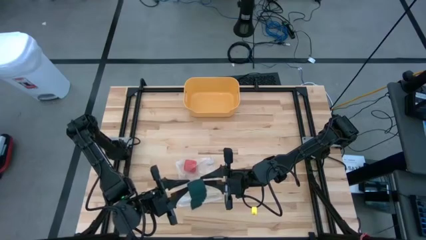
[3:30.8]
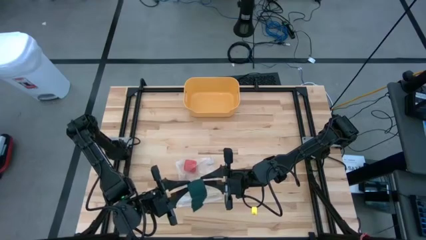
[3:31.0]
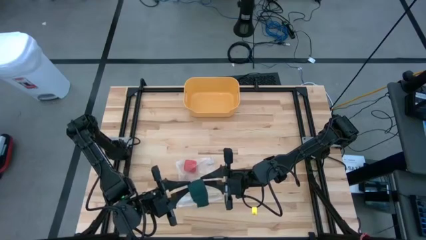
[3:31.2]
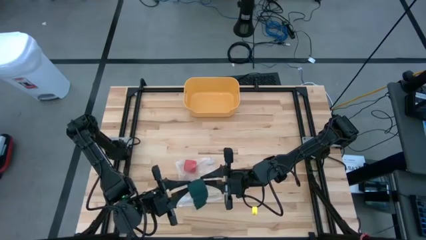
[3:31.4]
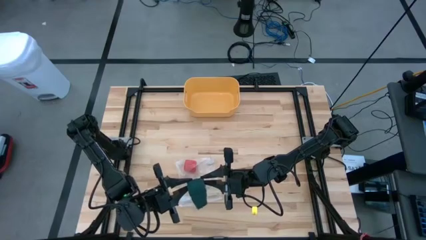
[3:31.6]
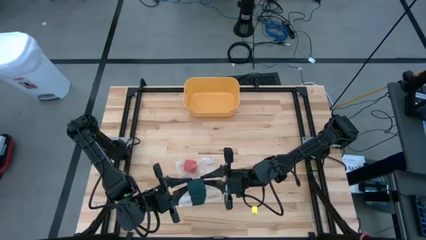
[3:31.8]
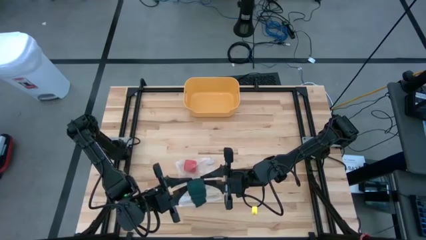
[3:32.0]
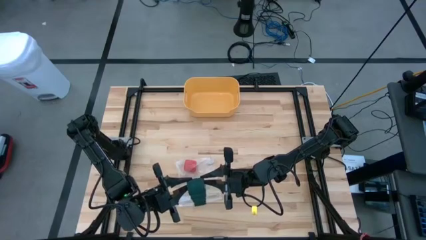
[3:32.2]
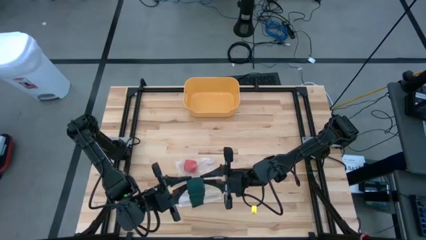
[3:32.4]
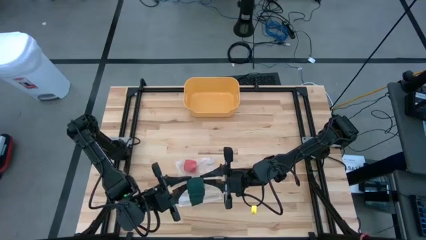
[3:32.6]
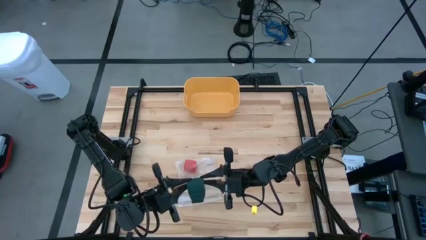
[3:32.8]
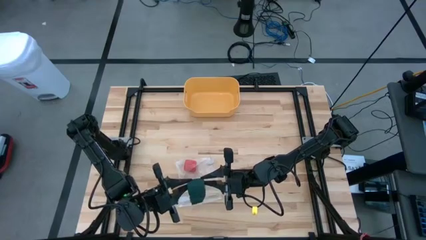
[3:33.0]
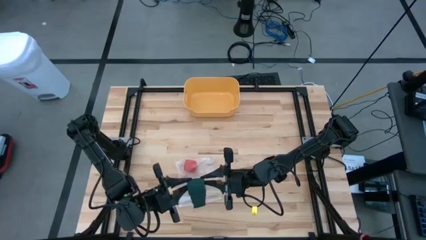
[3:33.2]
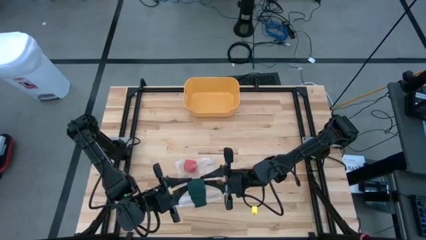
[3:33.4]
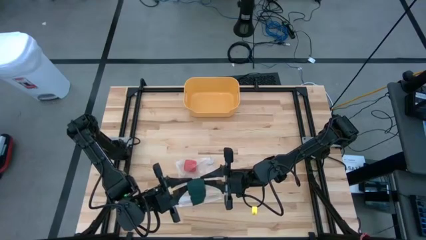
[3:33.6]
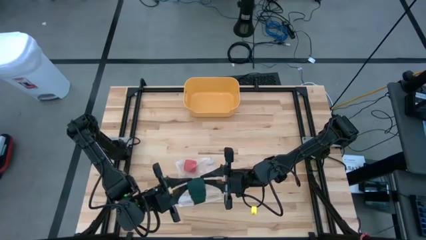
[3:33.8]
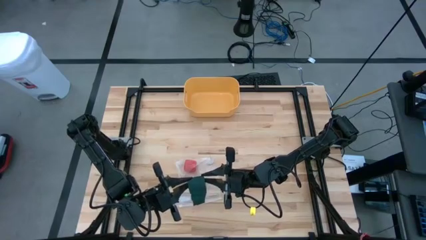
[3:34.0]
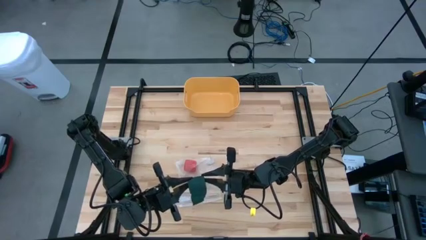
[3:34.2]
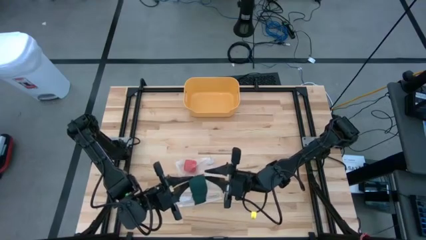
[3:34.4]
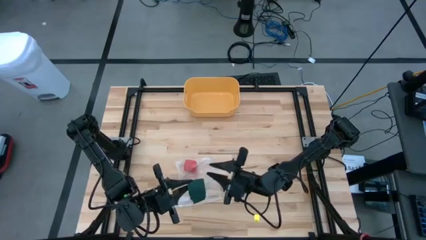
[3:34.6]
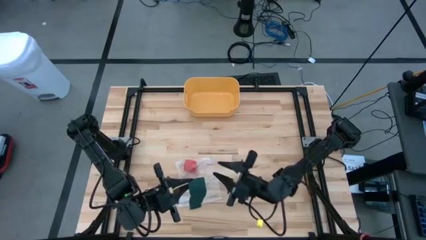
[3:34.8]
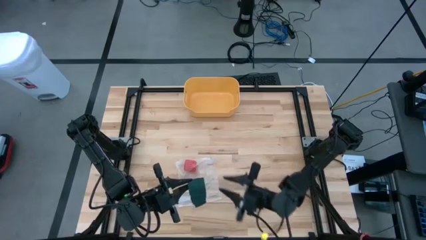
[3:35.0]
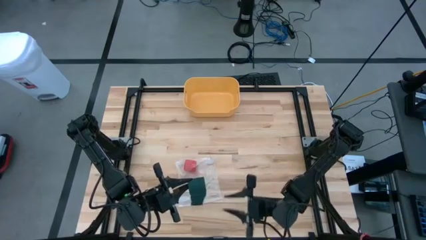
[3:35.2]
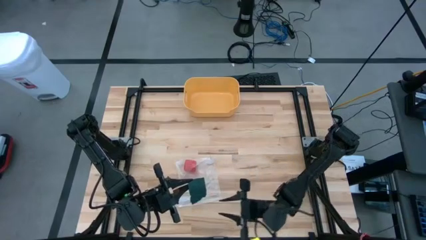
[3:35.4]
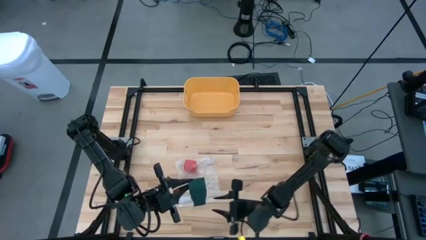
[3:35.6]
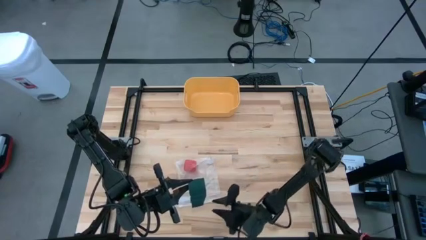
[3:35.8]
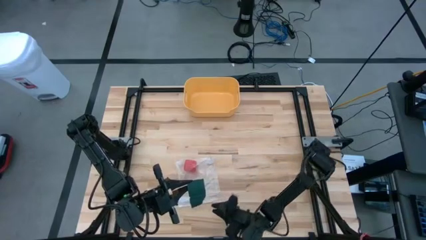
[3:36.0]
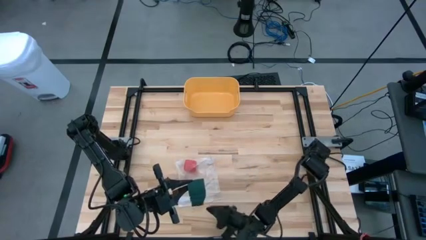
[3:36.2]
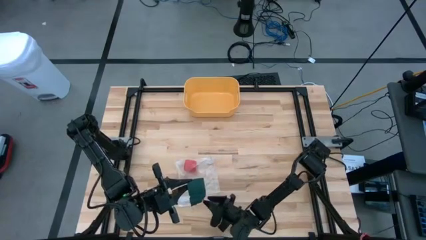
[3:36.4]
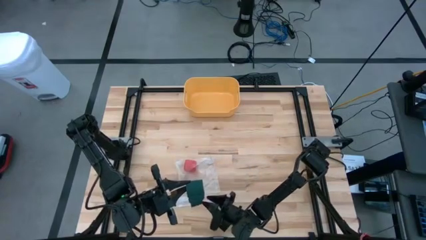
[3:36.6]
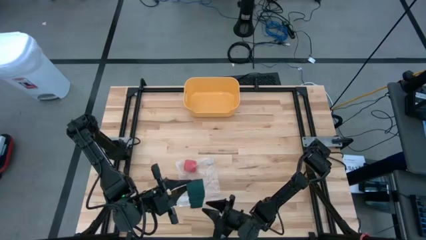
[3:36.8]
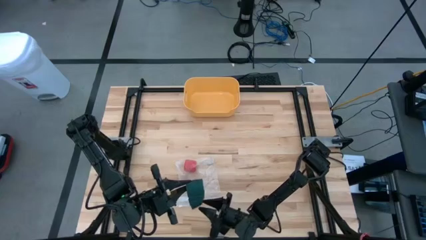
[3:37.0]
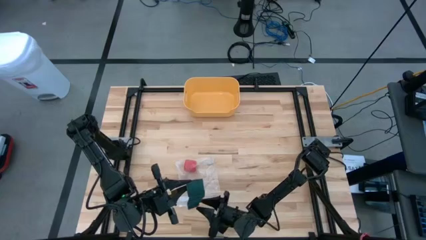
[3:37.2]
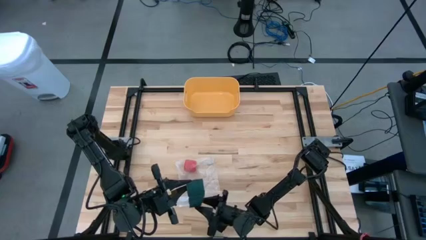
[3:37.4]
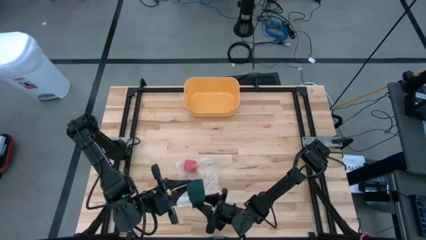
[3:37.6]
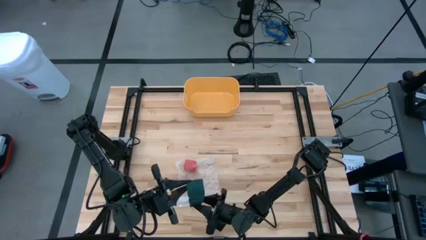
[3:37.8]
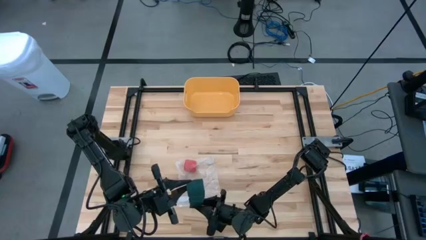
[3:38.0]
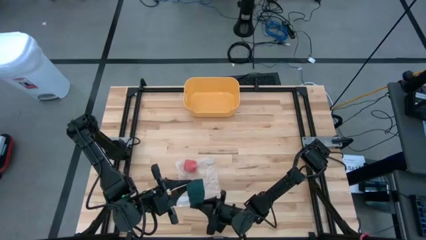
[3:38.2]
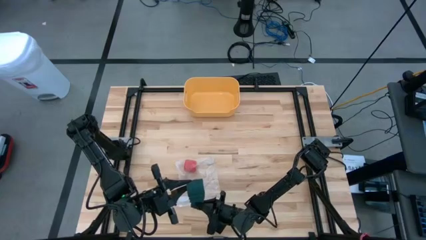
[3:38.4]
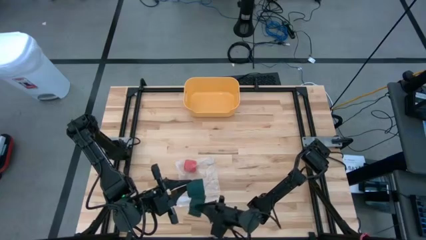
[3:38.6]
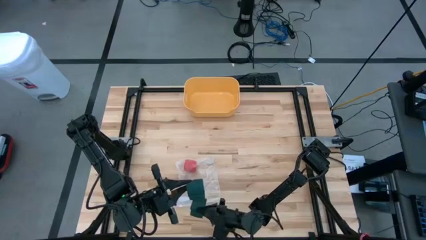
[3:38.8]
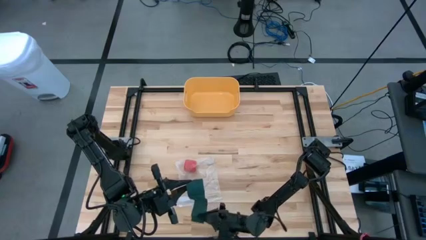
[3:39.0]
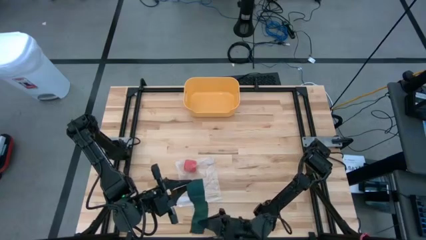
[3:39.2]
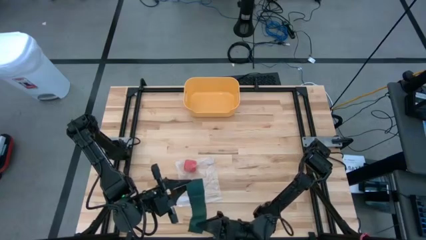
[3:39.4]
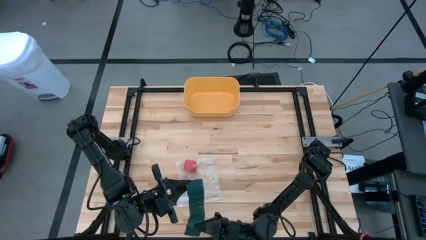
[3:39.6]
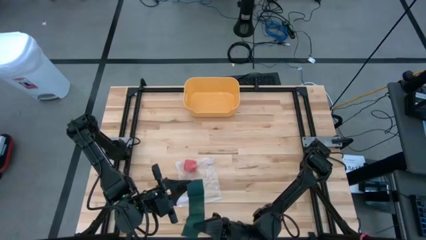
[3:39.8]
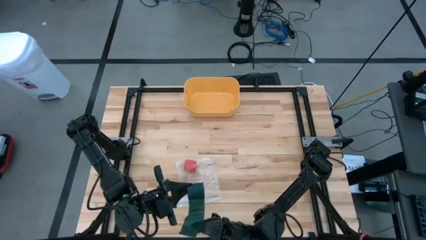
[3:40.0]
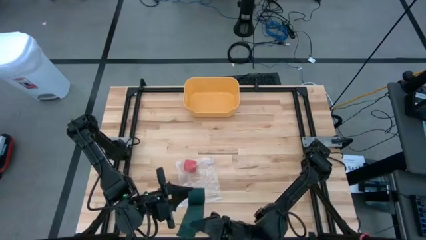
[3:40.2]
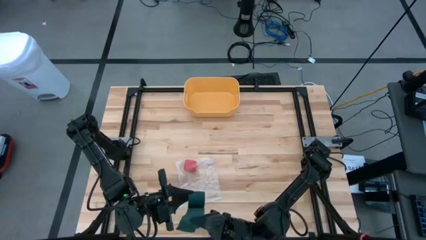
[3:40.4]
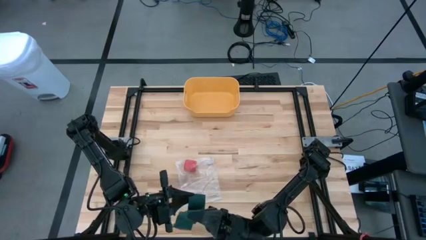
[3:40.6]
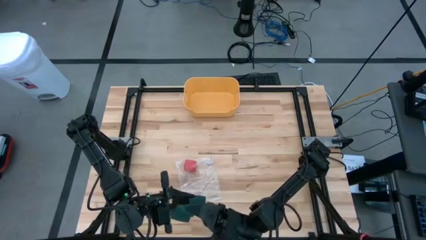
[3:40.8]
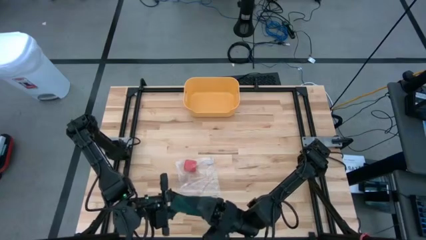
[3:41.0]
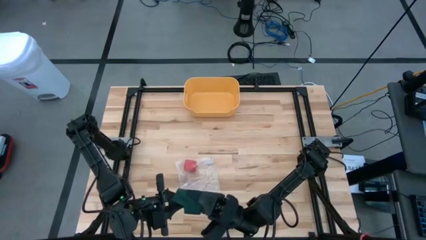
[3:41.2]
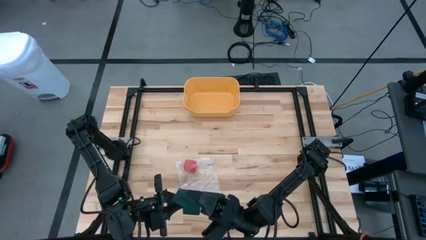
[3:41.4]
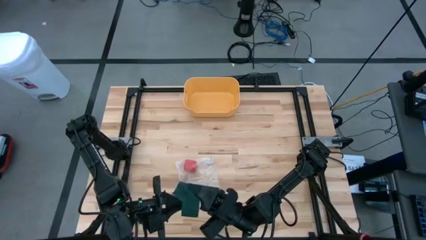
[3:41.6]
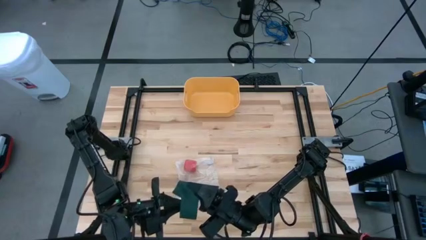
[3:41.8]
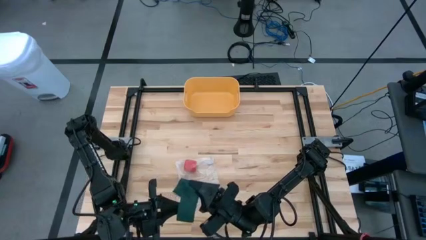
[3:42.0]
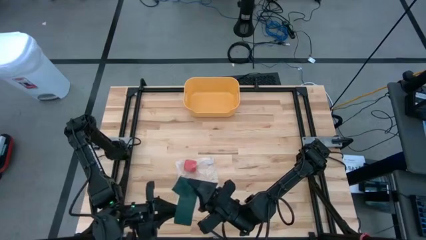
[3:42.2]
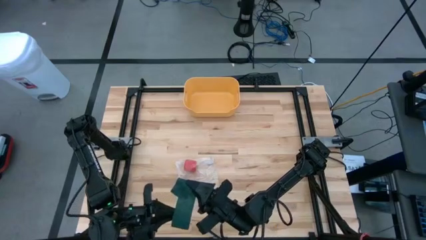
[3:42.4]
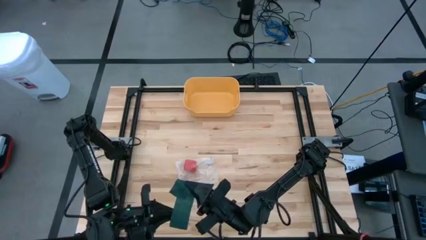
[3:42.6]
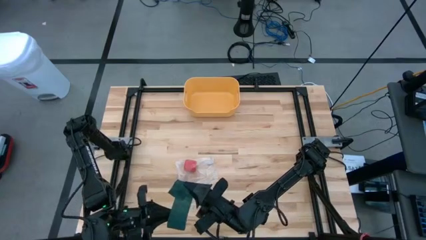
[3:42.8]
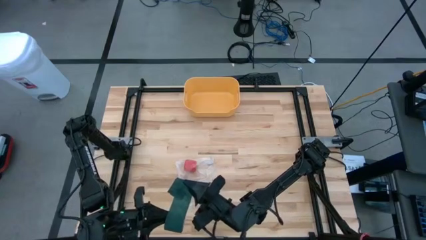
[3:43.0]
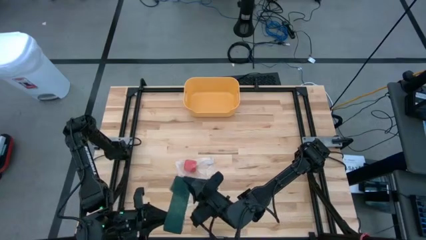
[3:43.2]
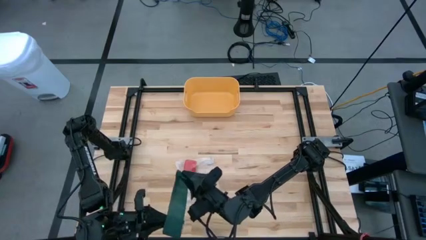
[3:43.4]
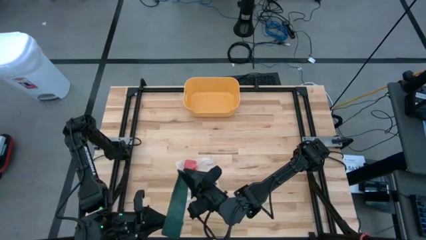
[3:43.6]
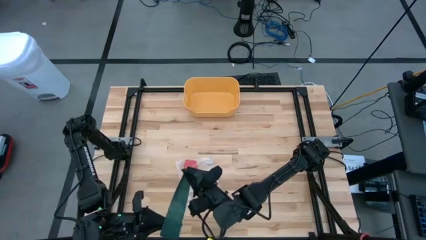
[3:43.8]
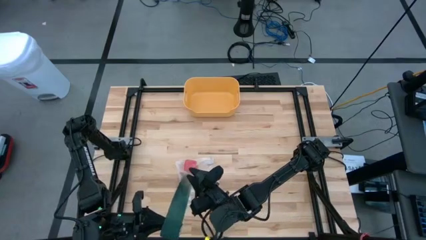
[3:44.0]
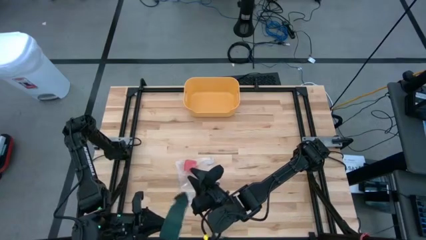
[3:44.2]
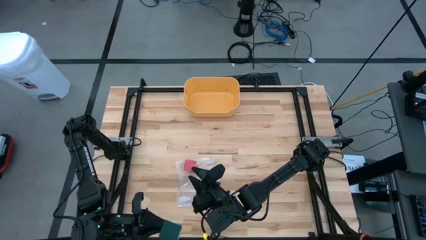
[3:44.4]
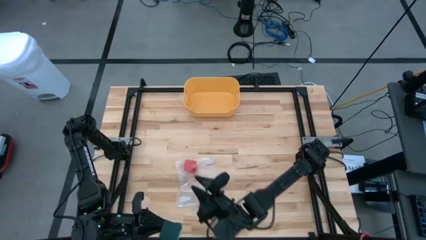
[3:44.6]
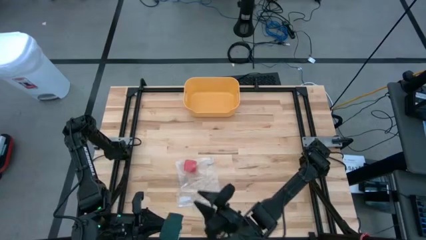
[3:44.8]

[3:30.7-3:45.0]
Task: Roll bandage
Roll the green bandage

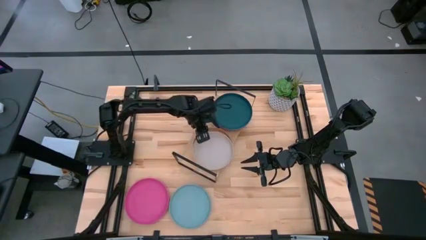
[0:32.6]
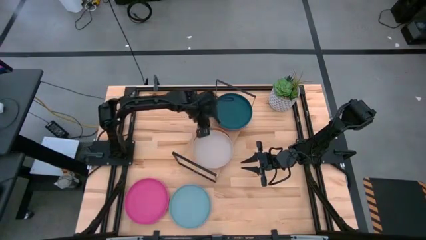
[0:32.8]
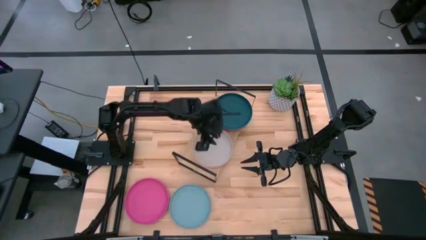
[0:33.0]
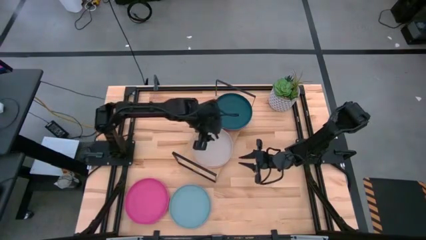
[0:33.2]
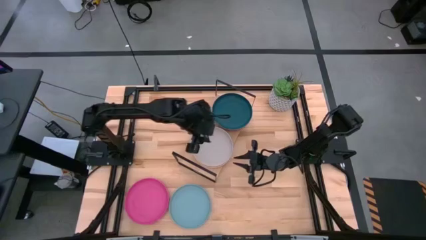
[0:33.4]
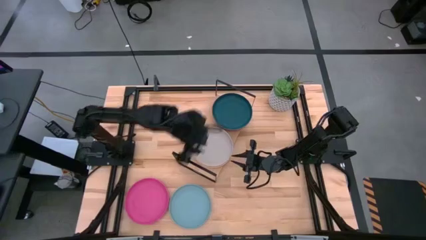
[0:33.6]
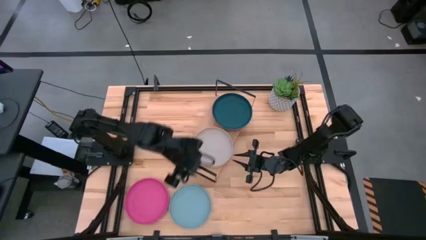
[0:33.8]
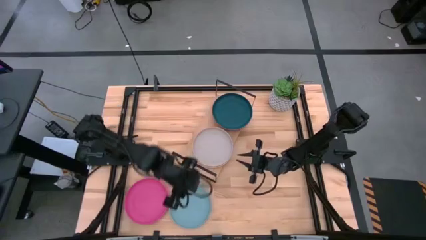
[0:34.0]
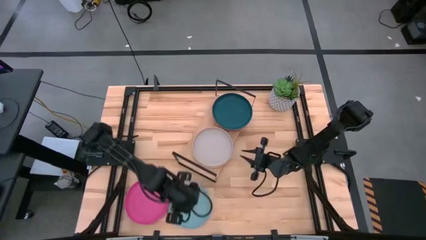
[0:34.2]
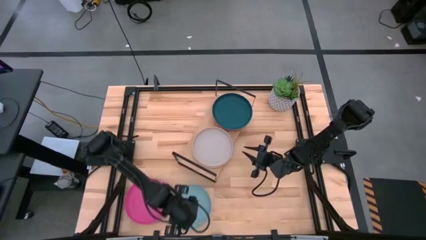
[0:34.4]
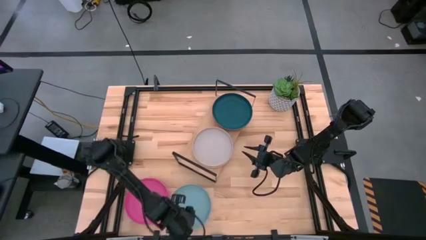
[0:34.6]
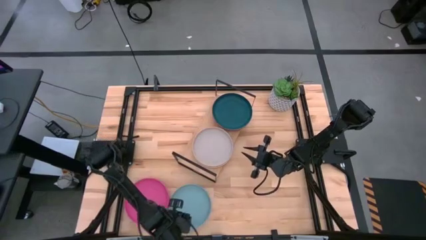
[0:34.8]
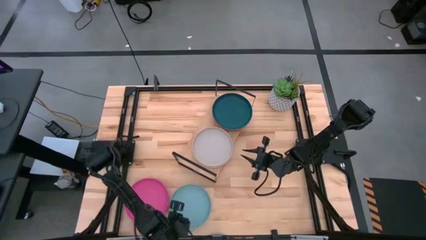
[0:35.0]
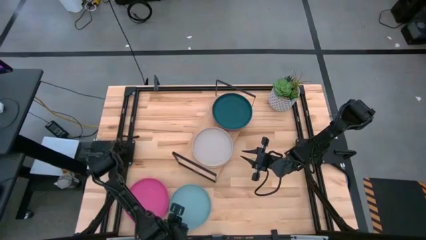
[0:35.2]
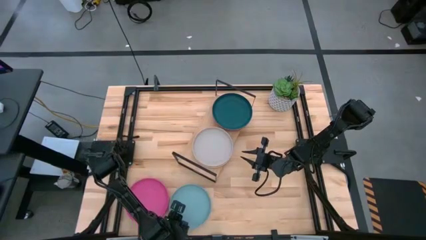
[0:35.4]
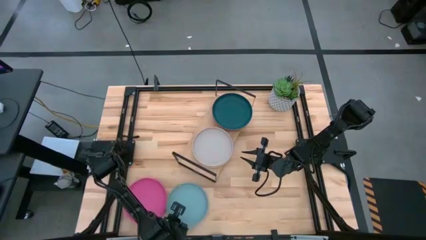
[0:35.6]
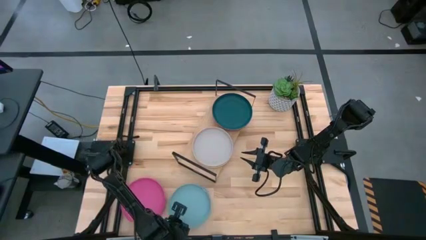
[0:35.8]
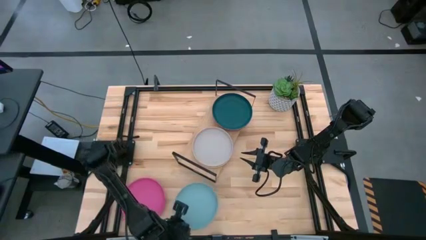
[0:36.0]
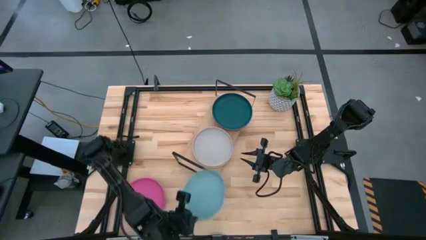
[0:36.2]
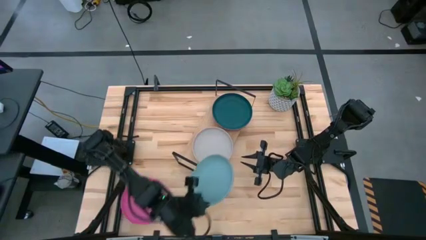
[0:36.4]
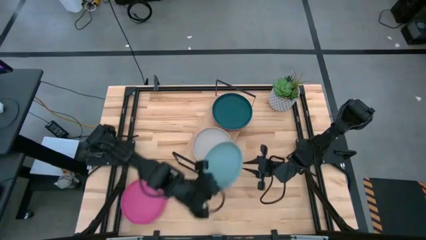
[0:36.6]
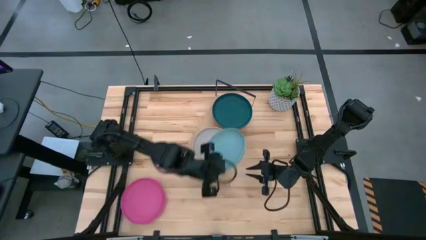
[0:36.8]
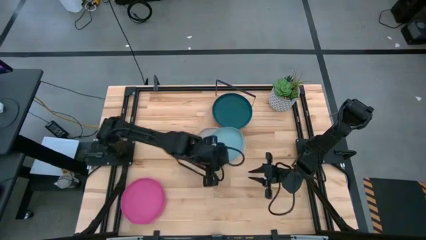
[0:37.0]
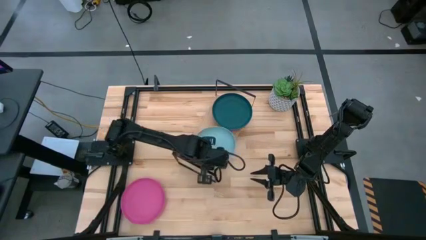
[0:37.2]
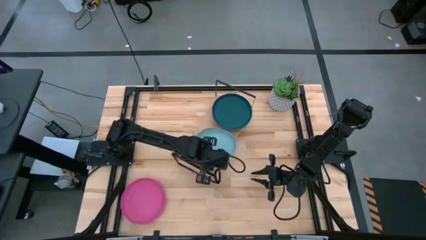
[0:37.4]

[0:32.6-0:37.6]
Task: Place and stack plates onto a shelf
Stack the dark grey plate on top of the grey plate on the shelf
